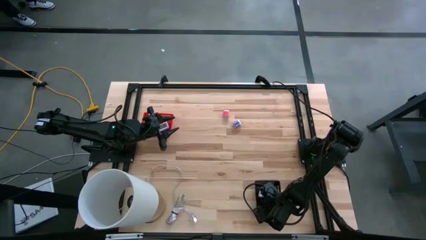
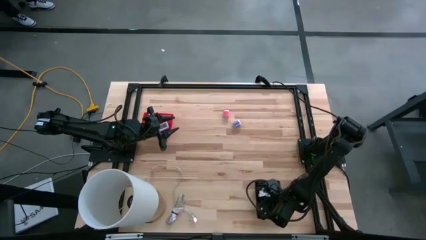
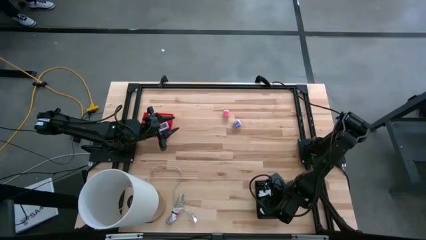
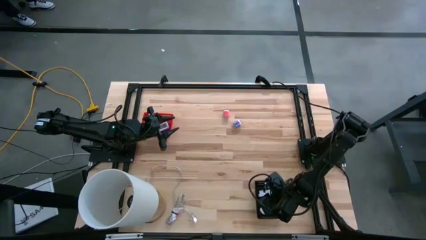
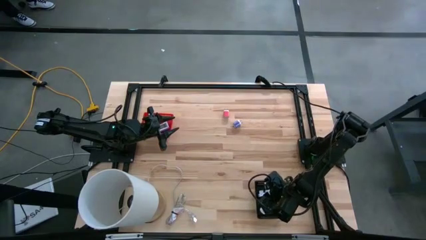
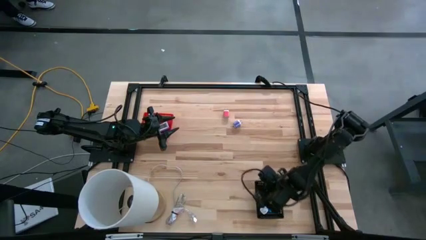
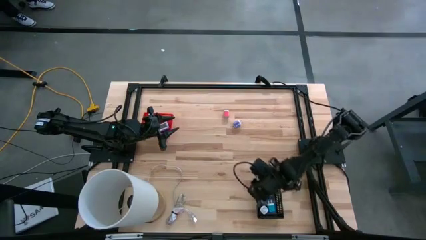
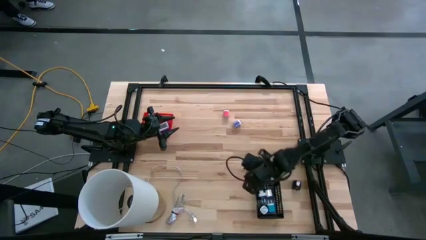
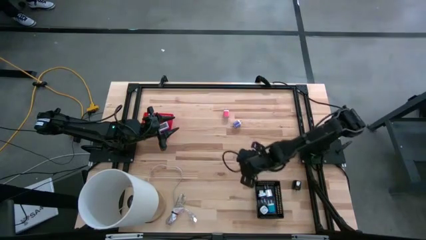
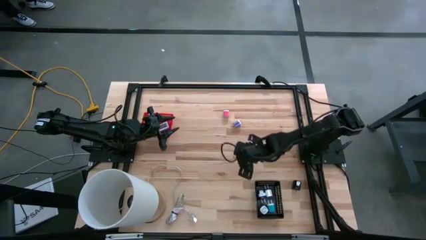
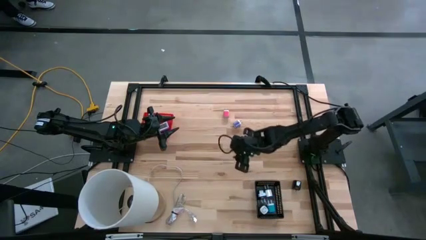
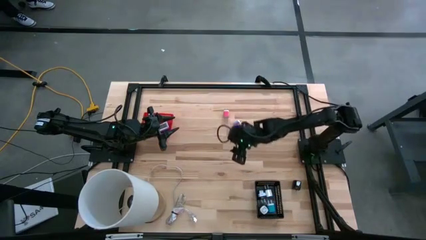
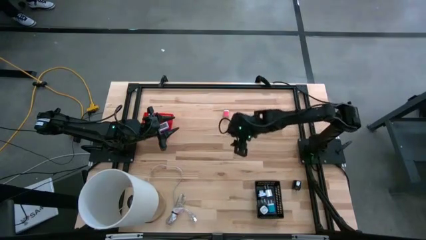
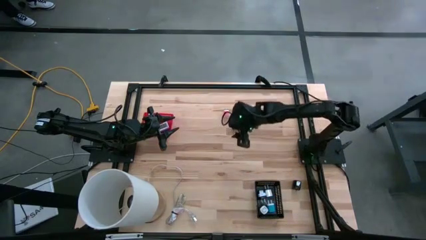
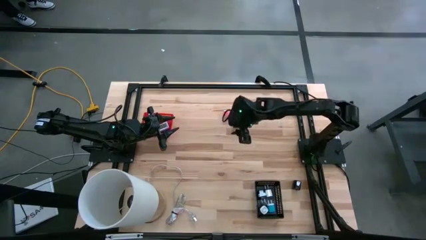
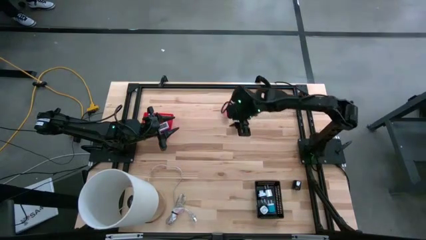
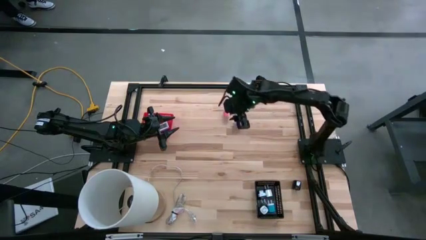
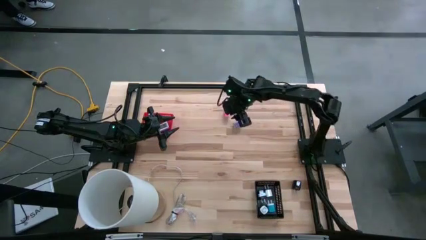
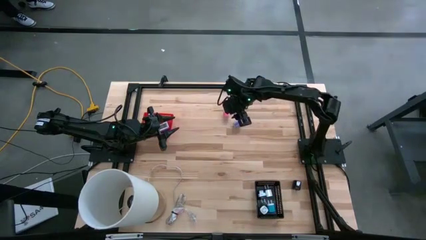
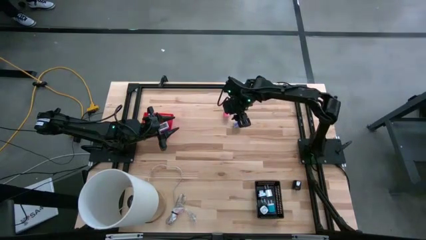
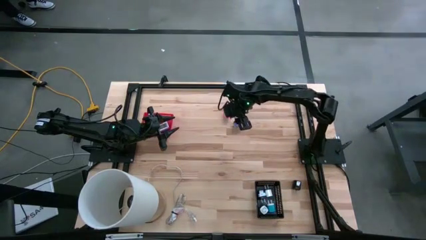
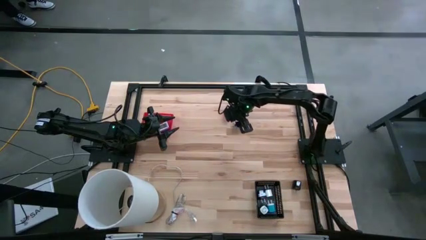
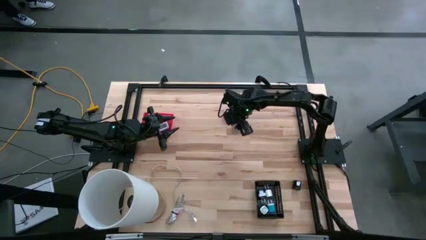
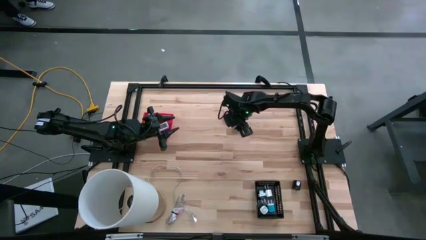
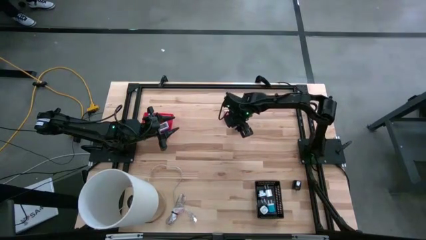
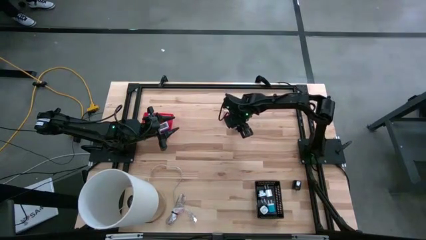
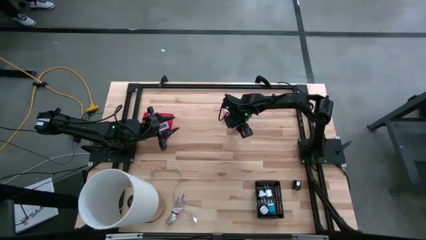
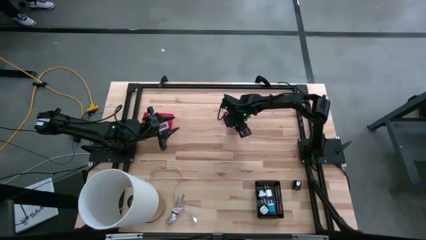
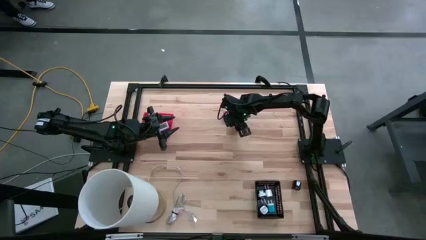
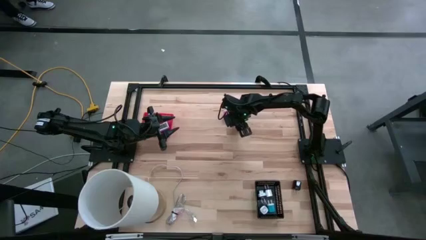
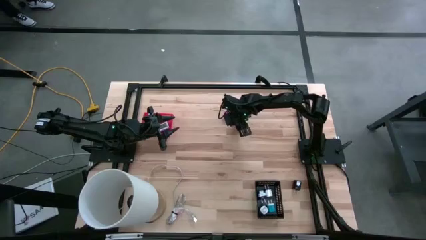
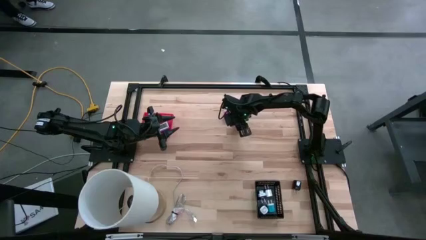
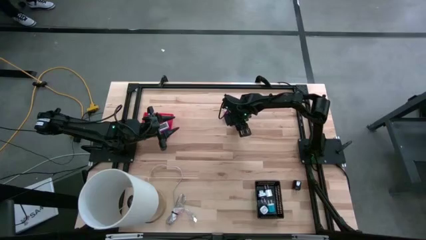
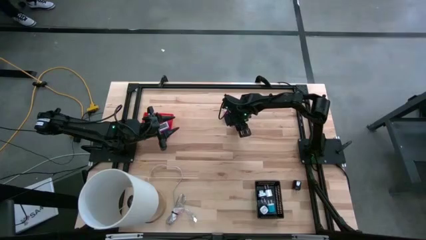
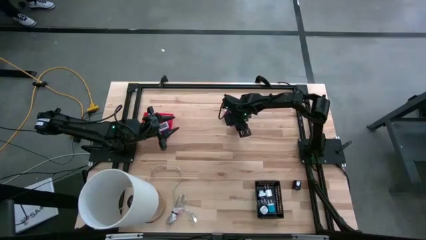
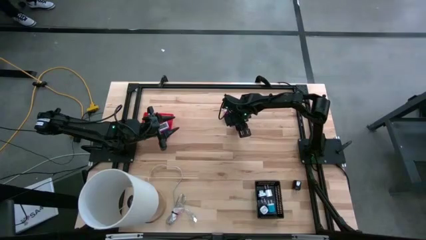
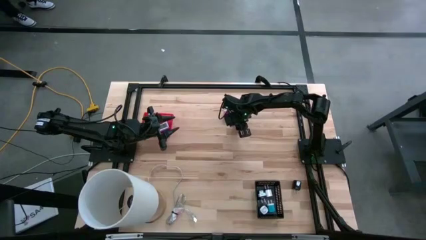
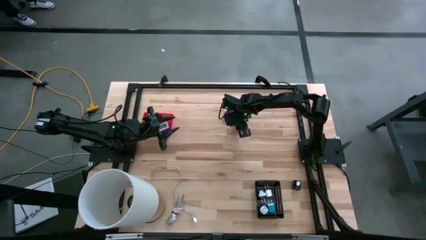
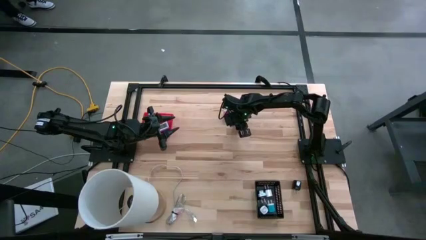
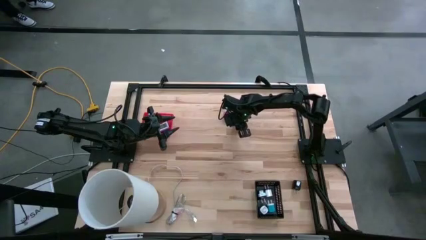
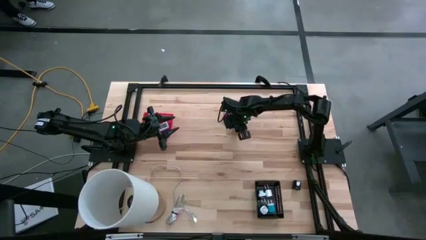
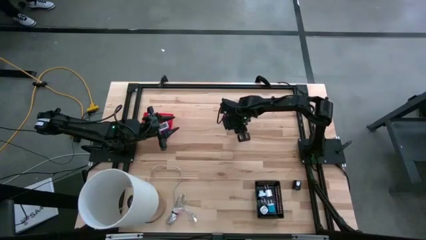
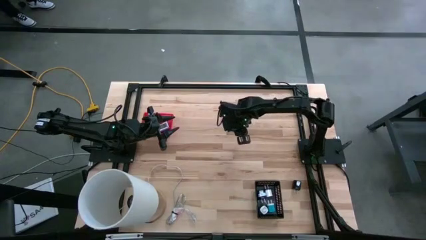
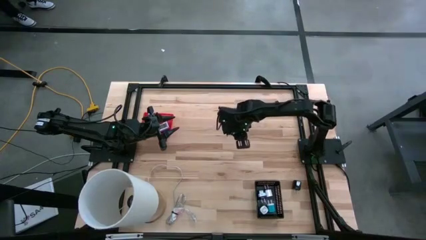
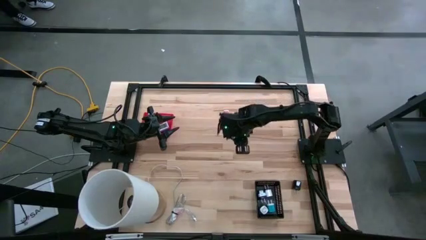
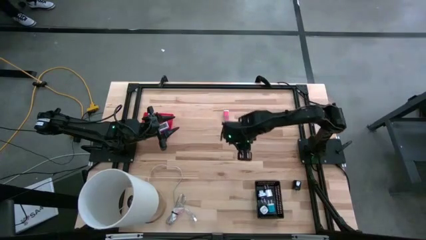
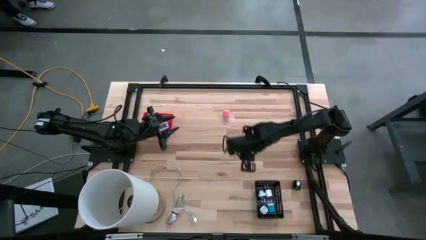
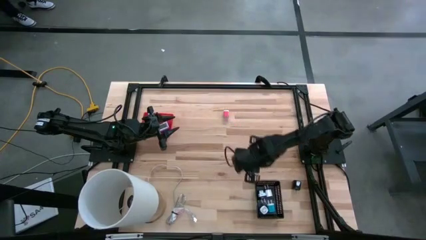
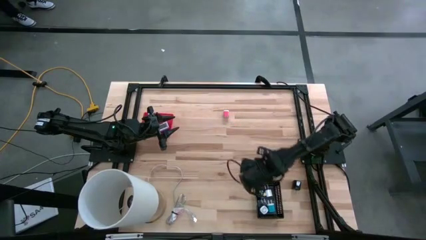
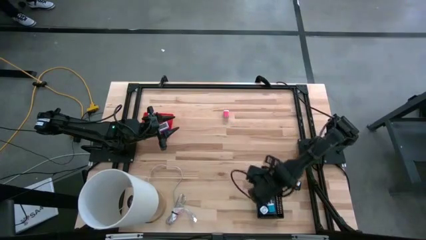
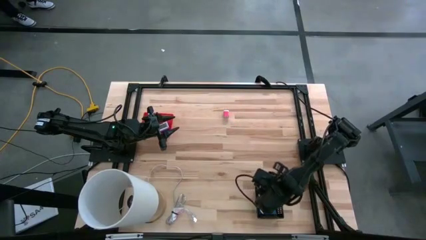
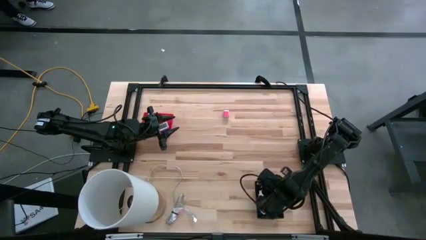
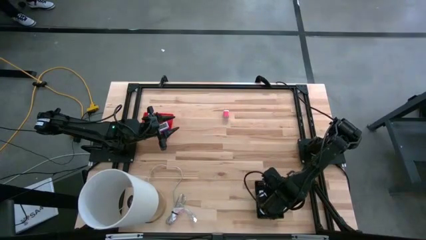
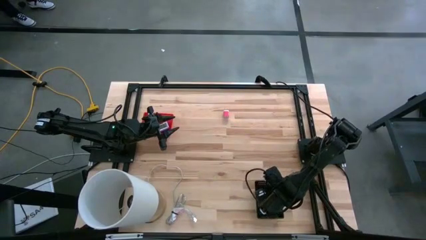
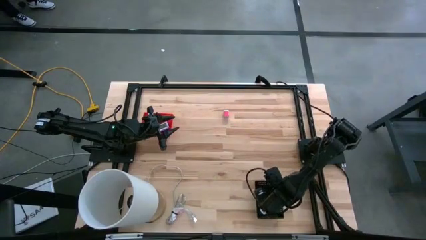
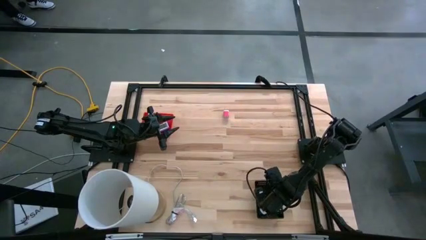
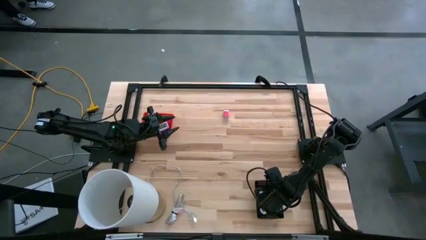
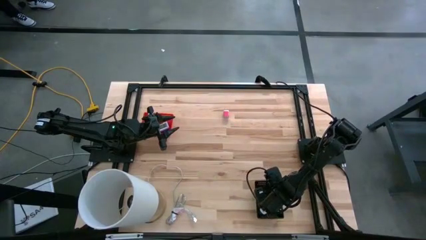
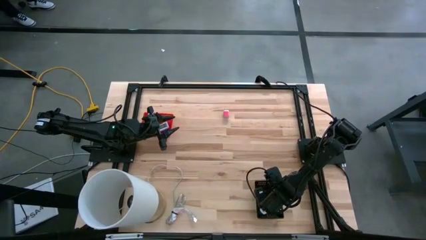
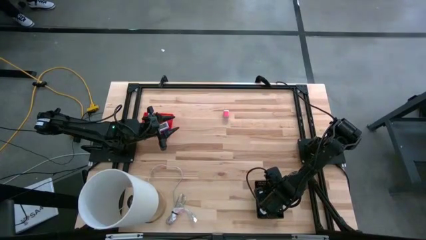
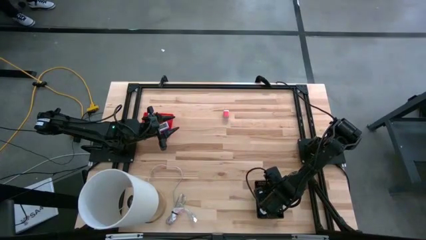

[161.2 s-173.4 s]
Task: Pick & Place Office items
Put the purple charger adapter into the black bin
